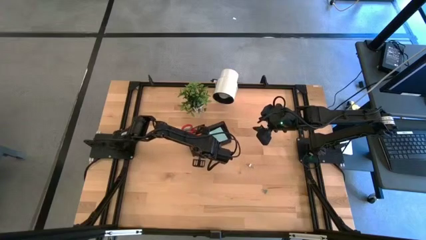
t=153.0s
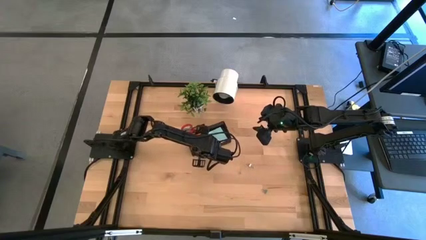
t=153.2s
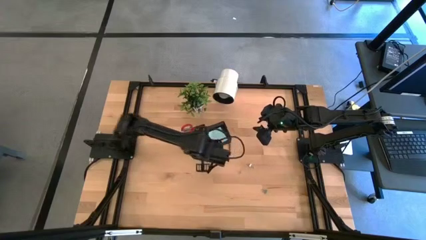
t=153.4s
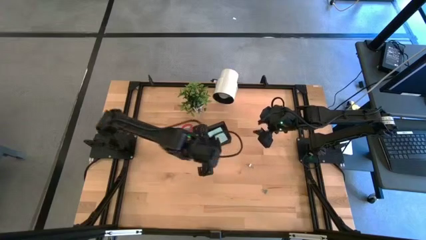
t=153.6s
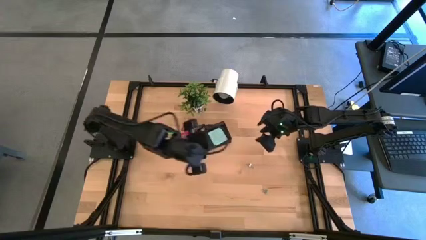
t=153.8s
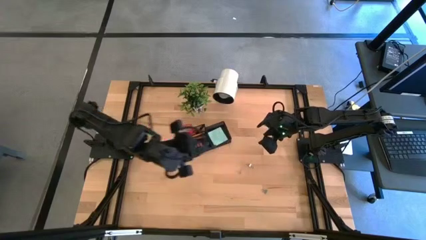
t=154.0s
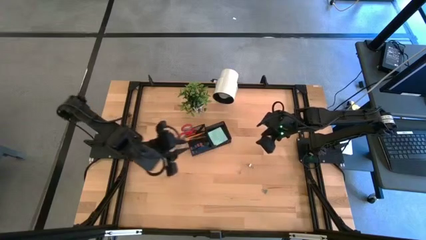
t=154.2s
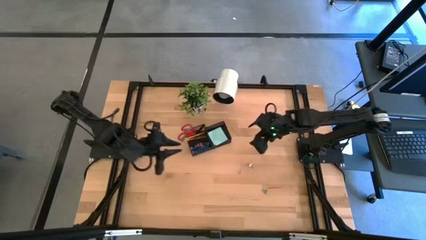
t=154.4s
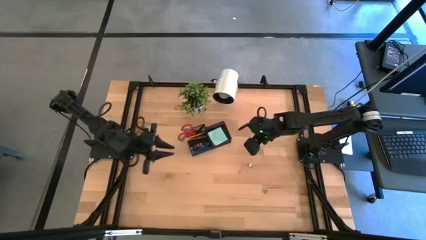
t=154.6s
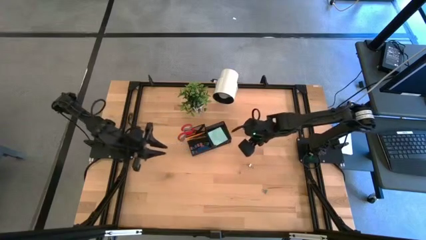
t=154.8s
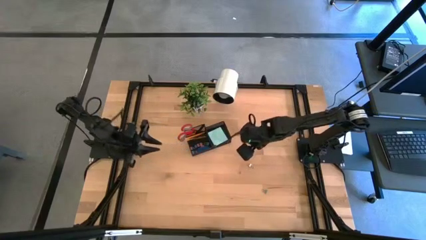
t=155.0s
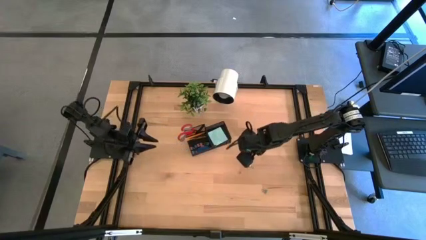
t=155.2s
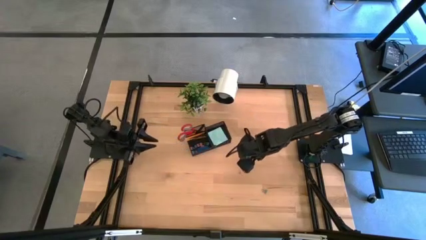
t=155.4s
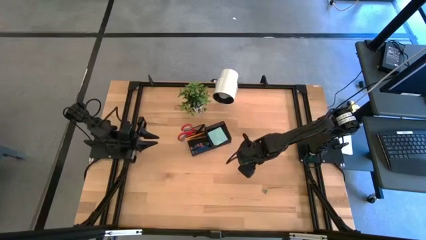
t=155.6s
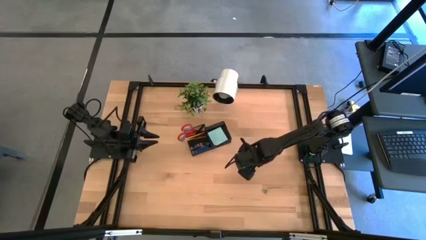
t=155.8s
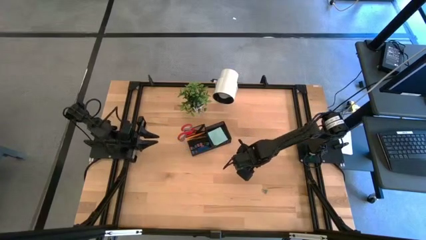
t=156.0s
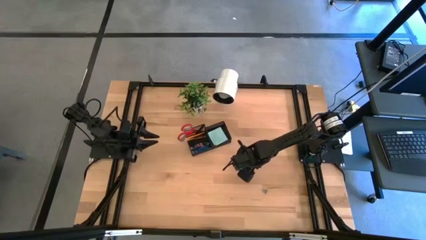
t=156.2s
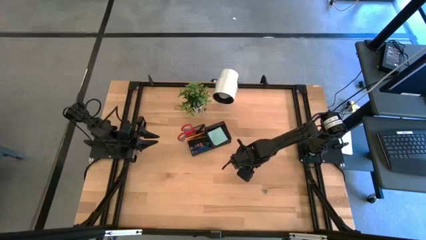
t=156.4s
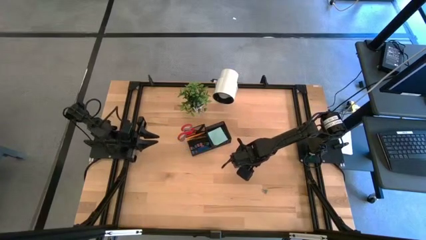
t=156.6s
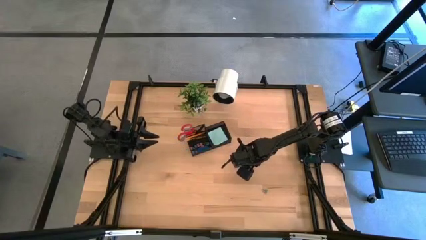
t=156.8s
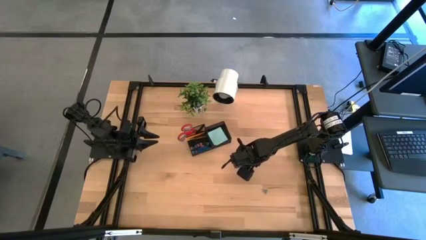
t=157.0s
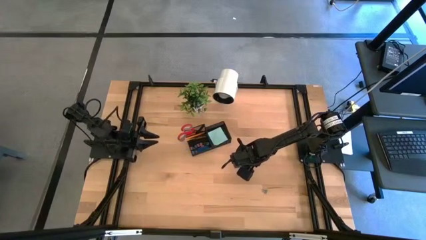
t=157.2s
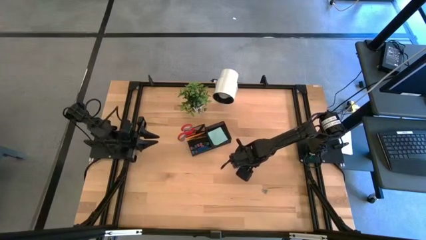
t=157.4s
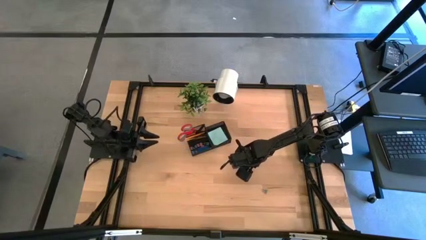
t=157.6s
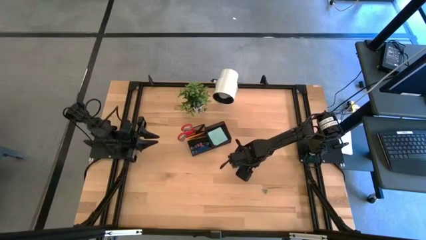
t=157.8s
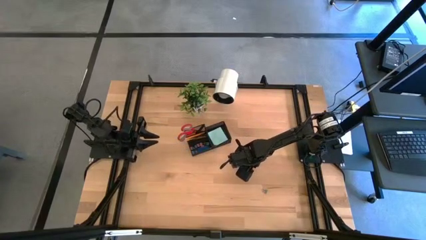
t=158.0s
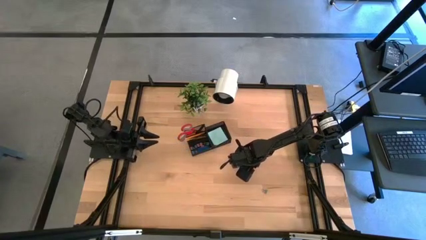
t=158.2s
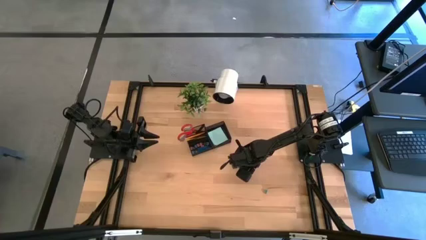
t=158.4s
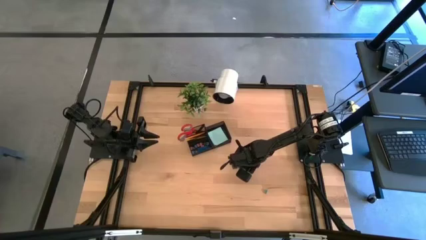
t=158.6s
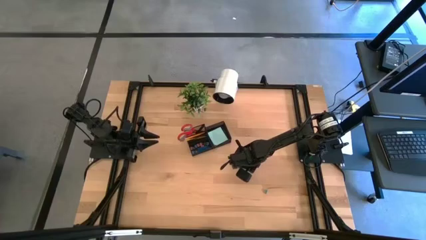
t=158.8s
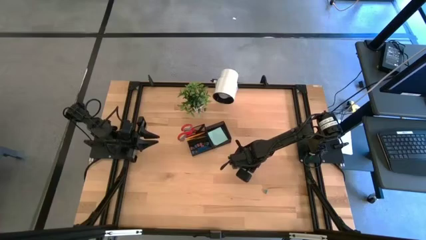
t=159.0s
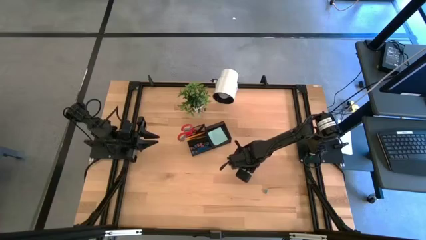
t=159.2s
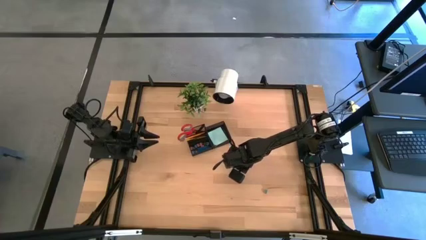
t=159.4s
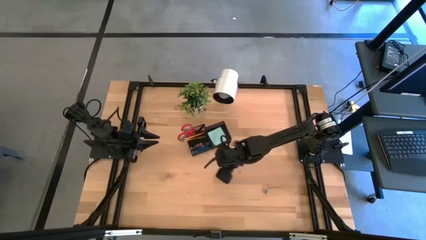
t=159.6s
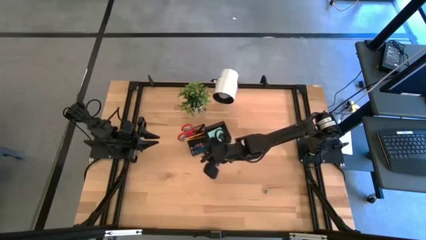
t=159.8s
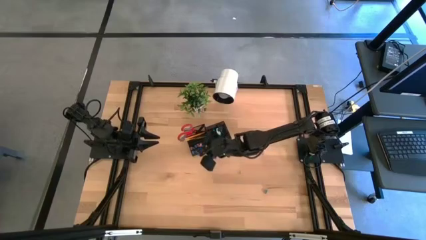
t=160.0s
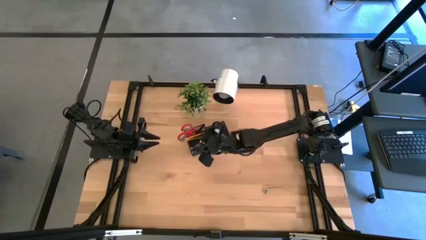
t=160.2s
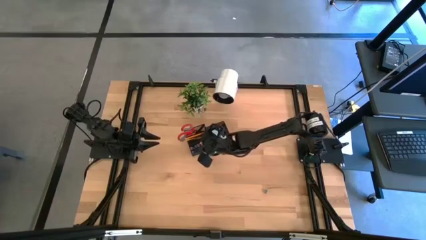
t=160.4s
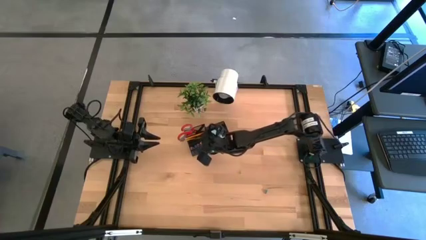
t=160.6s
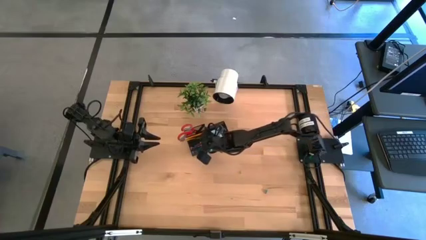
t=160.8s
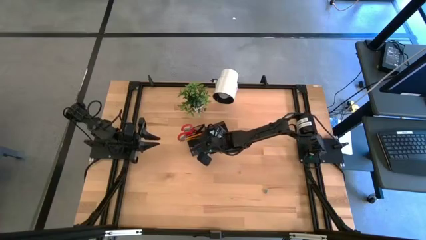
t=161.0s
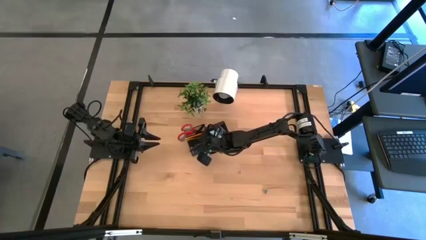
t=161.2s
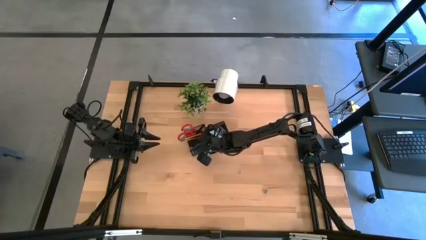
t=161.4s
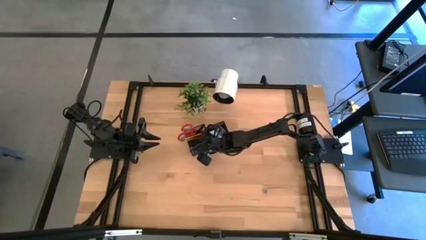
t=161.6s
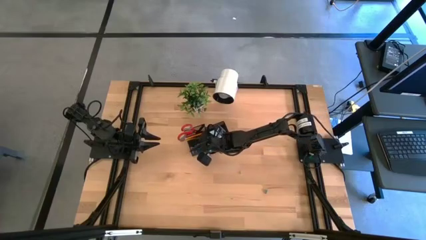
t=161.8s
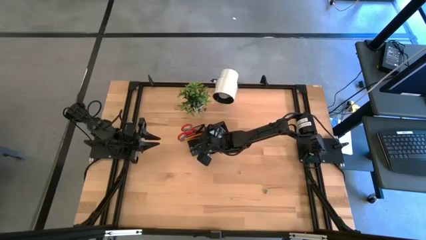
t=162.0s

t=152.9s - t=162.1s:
Task: Pick and place office supplies into organizer
Put the yellow binder clip into the black desk organizer

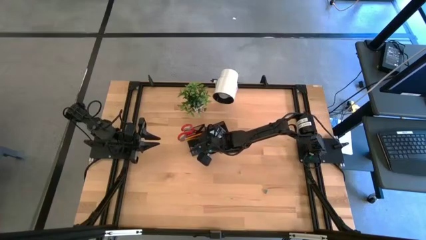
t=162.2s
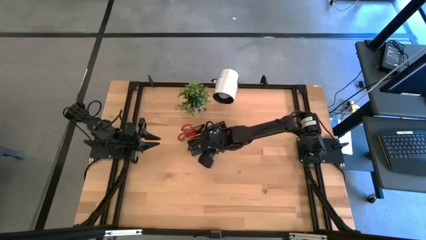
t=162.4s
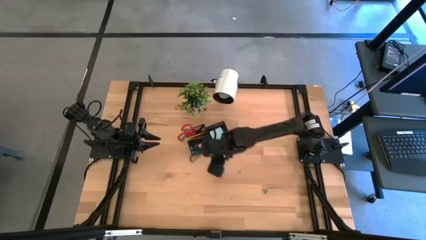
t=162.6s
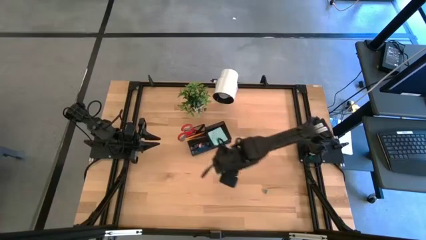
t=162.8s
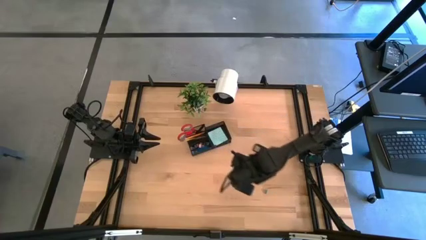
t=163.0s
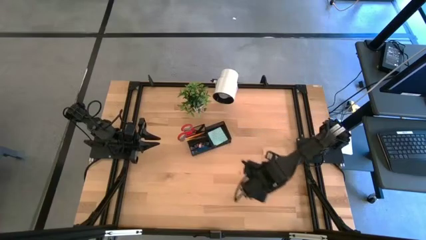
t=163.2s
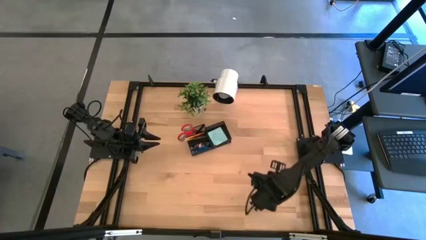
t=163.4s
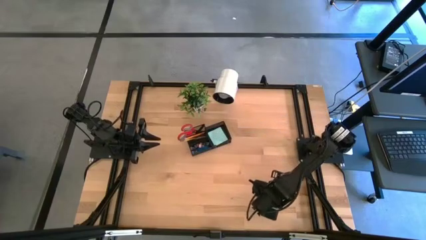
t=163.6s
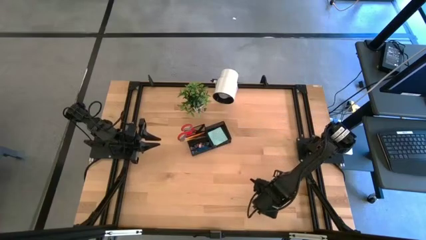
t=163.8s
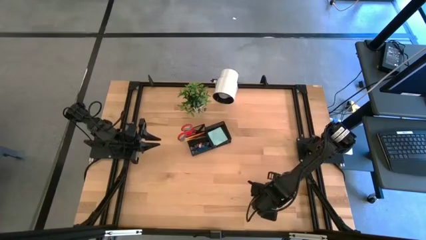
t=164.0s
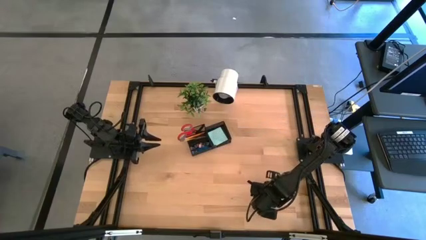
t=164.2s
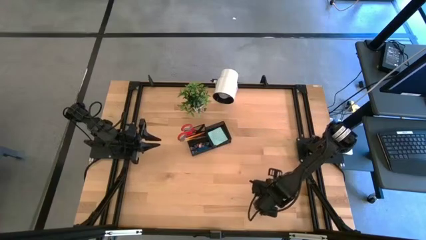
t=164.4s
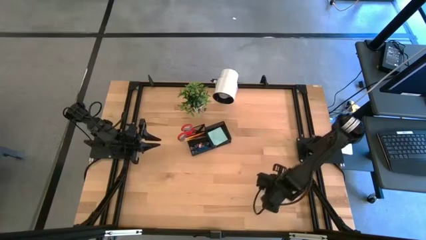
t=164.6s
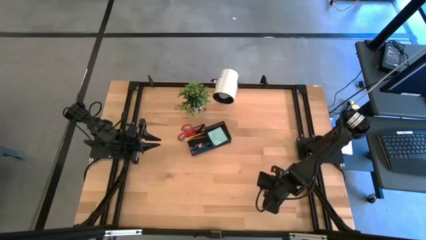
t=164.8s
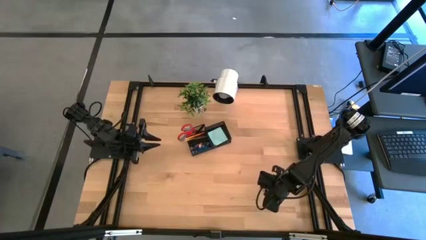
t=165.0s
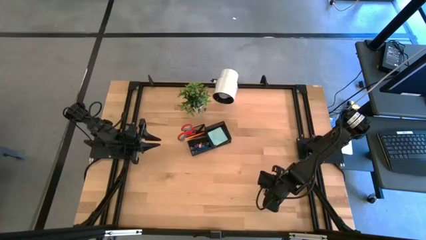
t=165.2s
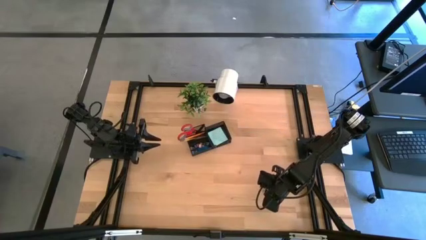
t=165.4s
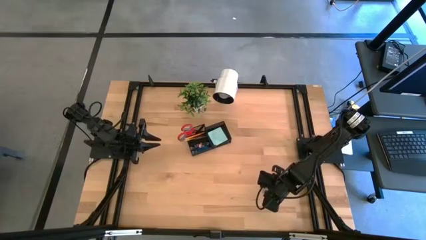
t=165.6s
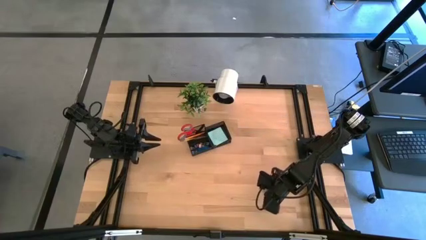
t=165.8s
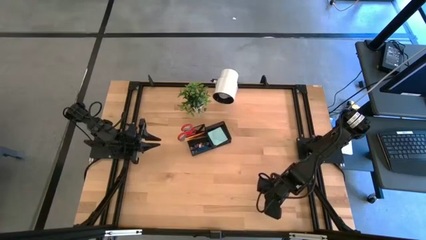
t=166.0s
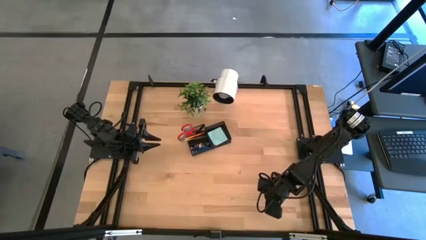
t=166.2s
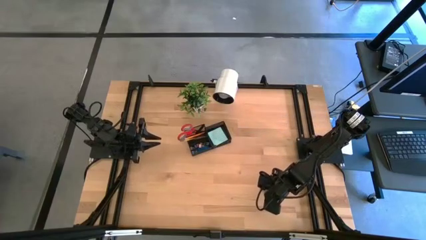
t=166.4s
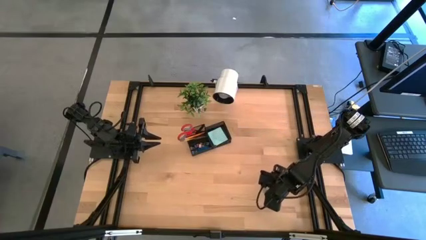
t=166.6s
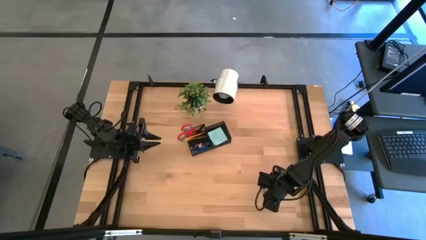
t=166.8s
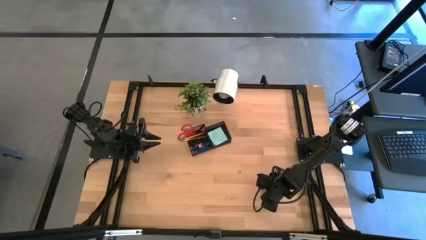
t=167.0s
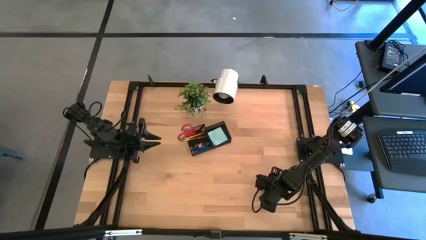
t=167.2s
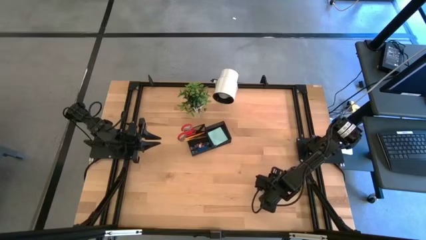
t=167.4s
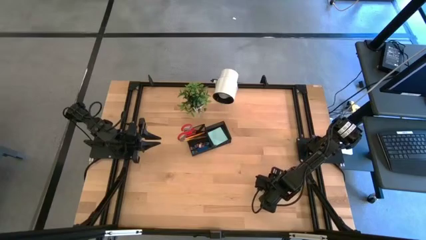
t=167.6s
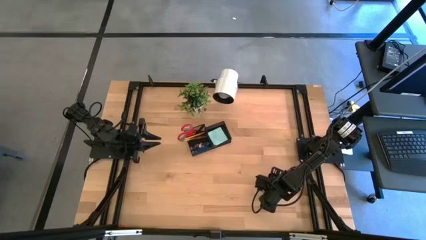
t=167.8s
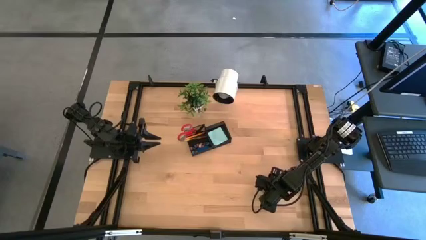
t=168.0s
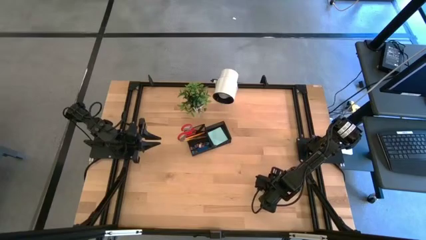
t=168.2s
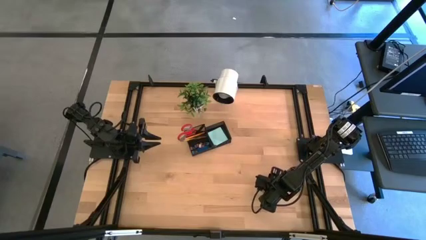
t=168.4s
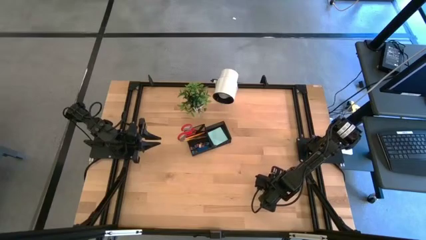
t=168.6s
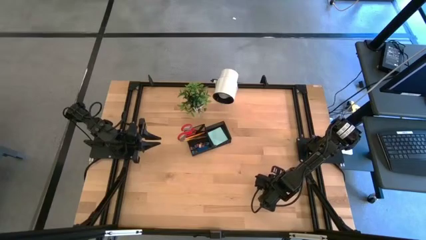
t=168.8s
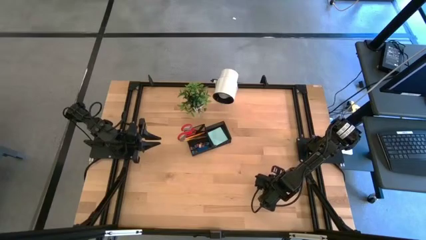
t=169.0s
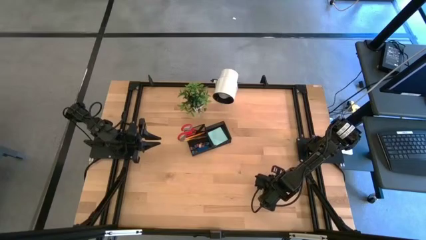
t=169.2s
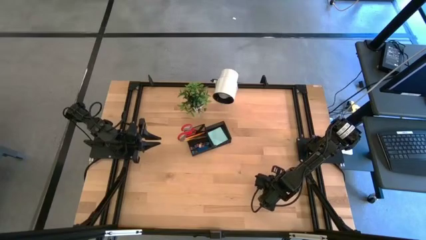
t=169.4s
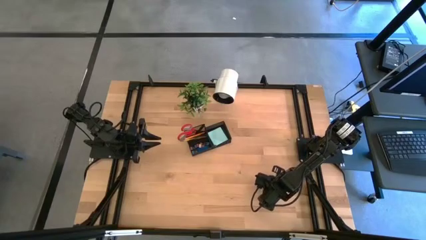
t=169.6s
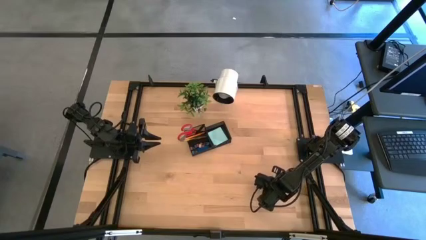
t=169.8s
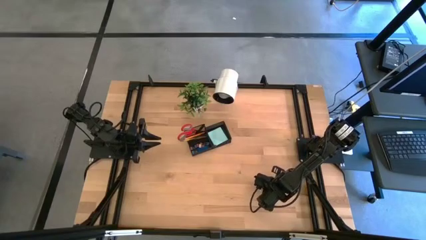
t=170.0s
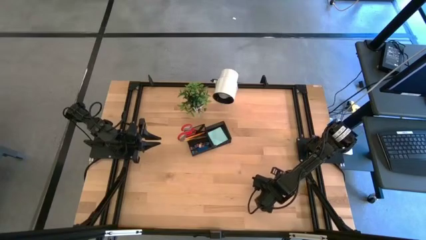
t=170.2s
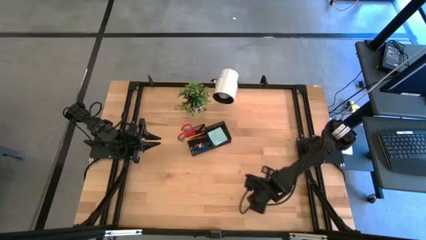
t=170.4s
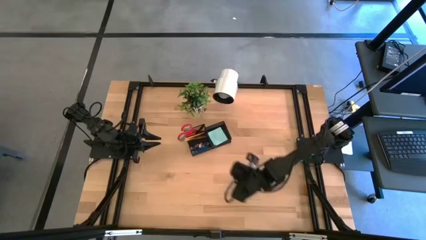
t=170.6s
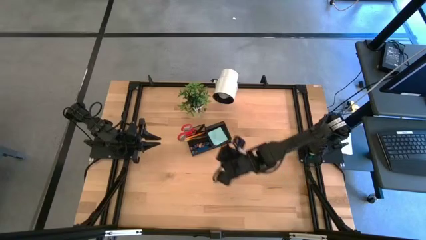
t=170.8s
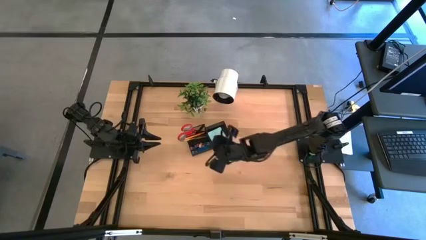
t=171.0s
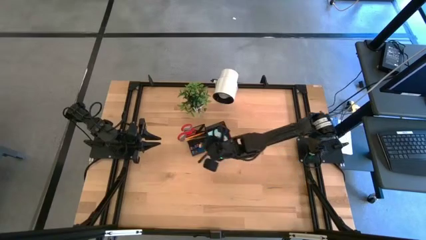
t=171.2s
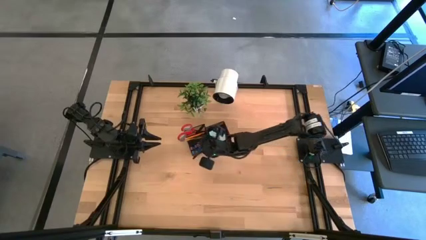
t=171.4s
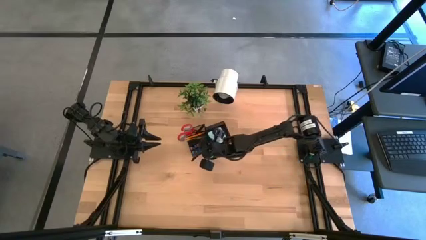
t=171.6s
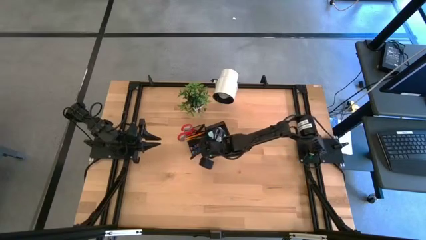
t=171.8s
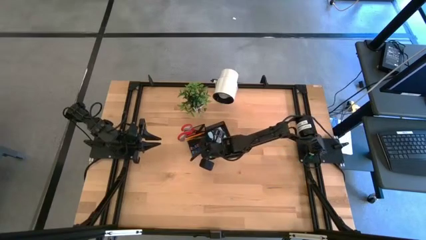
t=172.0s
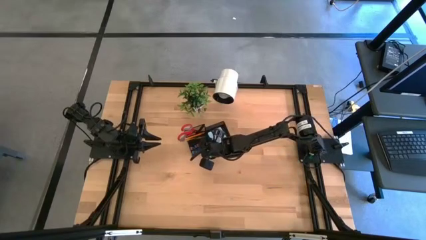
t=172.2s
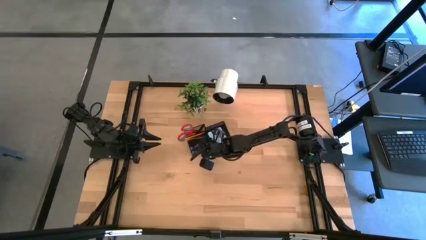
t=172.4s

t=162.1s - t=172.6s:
Put the blue binder clip into the black desk organizer
